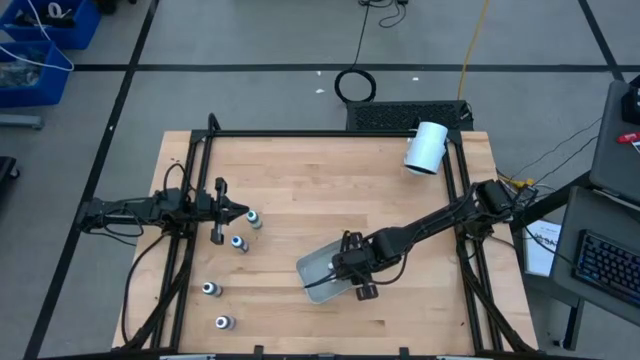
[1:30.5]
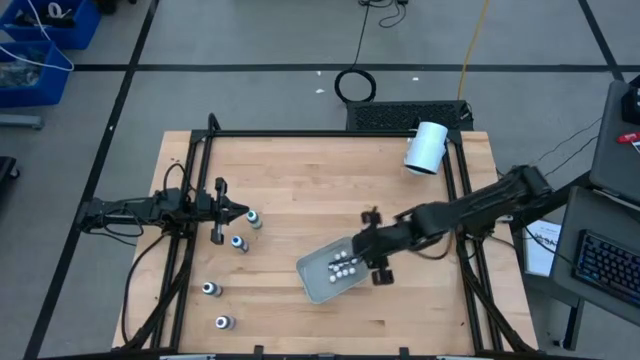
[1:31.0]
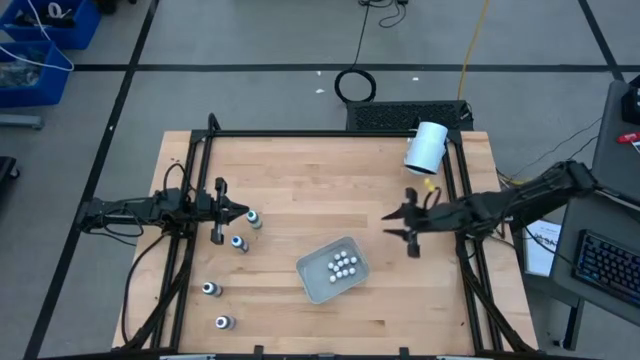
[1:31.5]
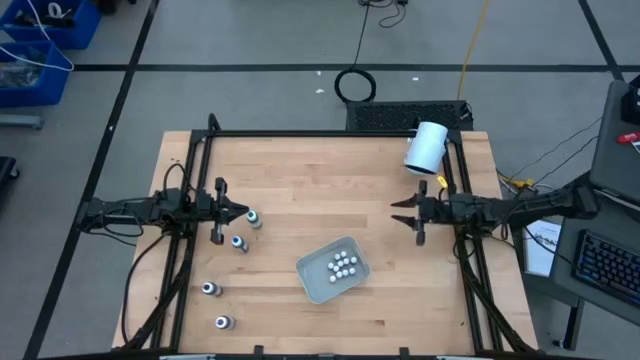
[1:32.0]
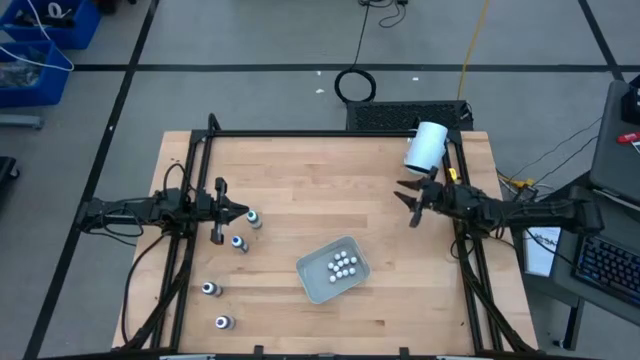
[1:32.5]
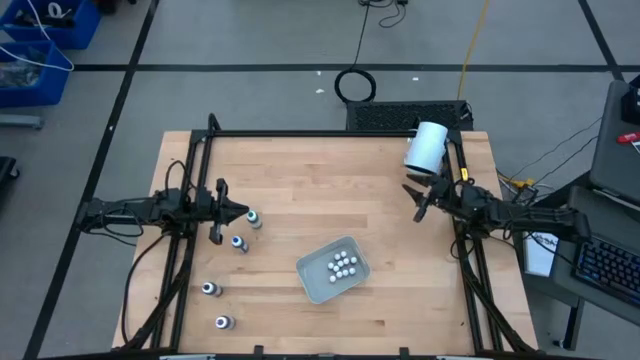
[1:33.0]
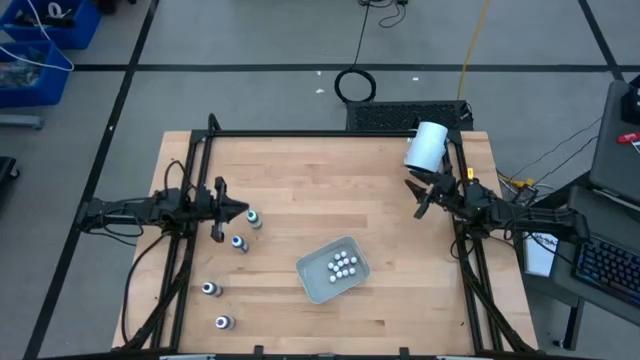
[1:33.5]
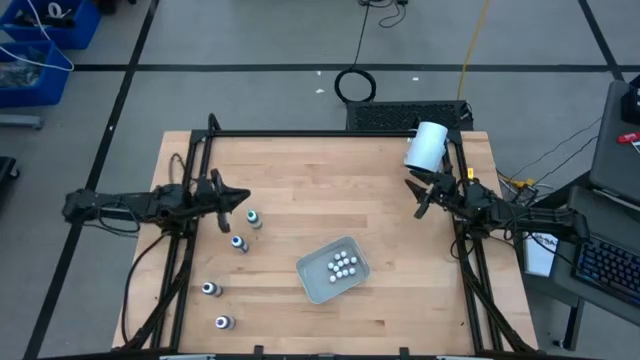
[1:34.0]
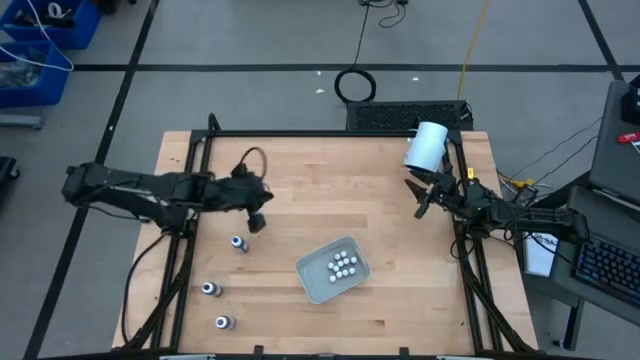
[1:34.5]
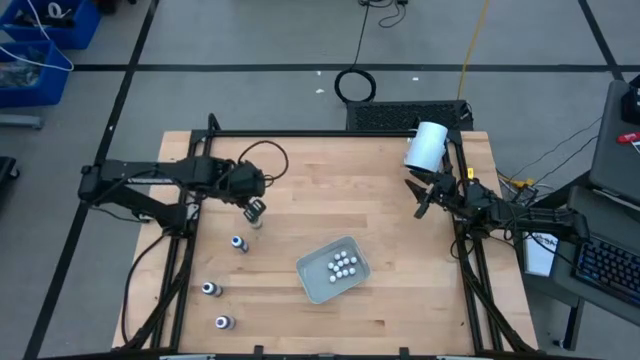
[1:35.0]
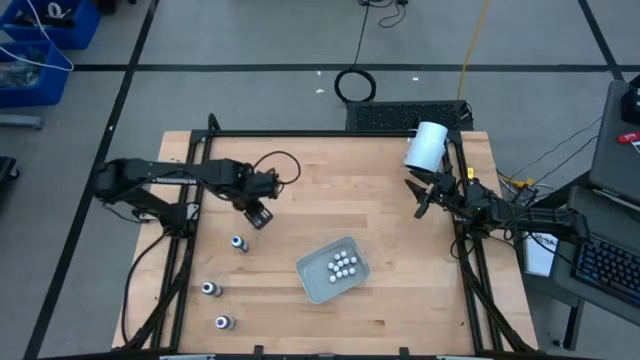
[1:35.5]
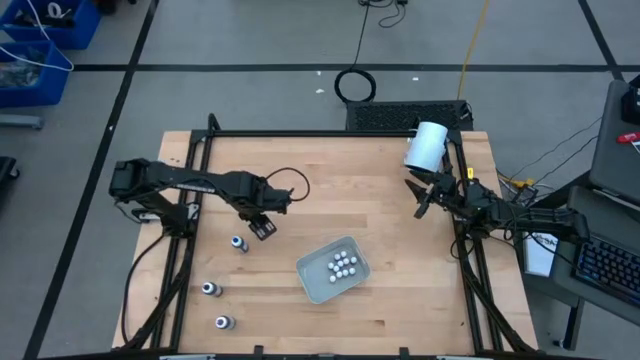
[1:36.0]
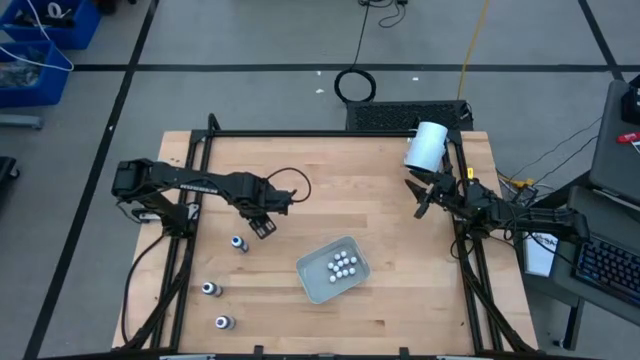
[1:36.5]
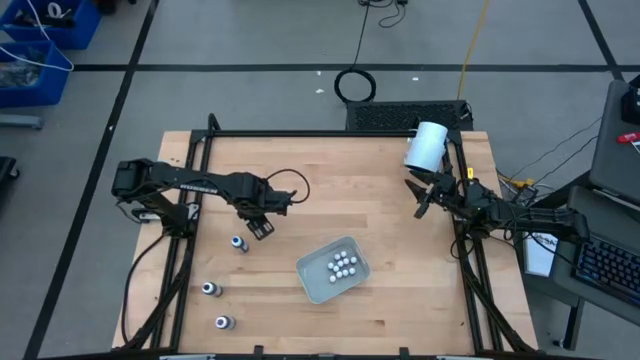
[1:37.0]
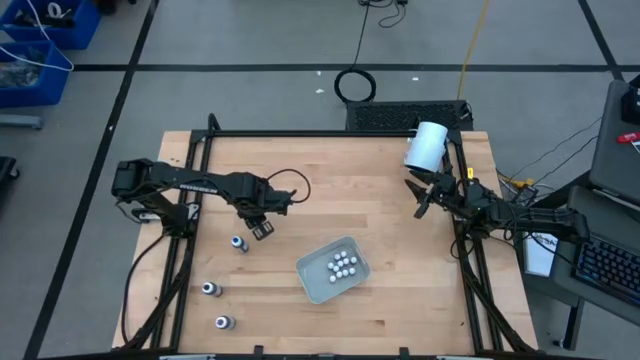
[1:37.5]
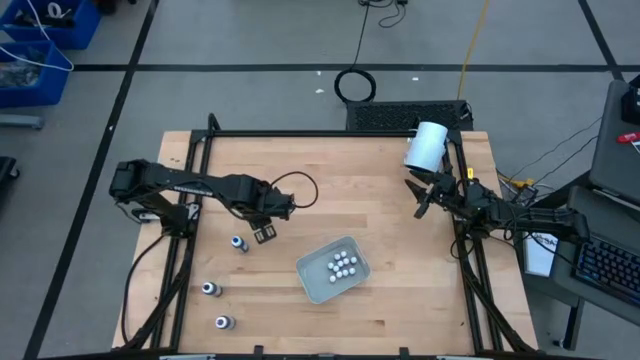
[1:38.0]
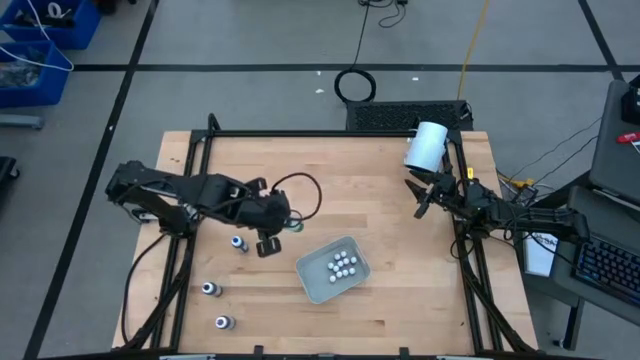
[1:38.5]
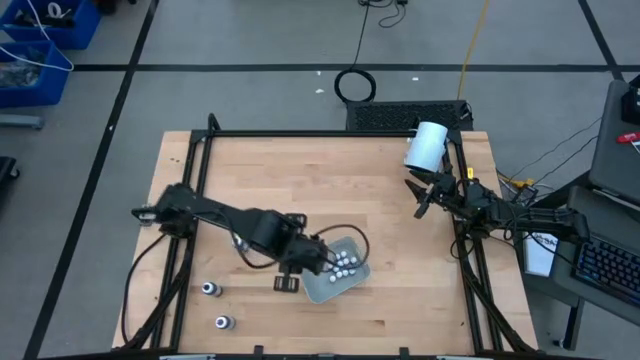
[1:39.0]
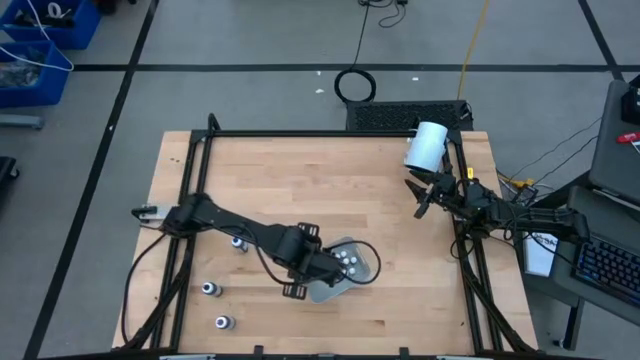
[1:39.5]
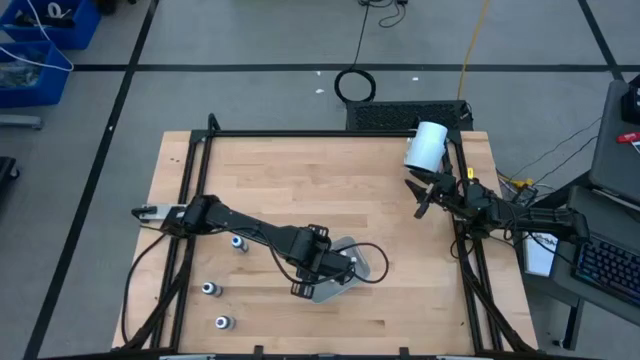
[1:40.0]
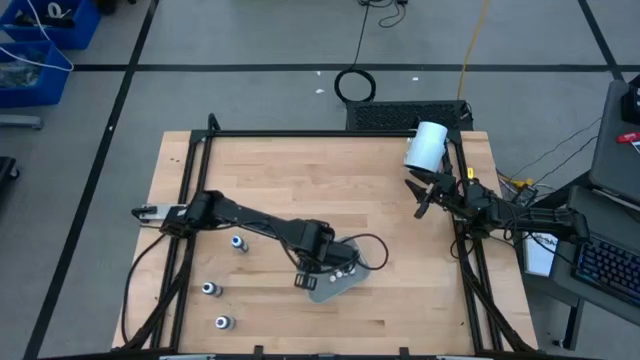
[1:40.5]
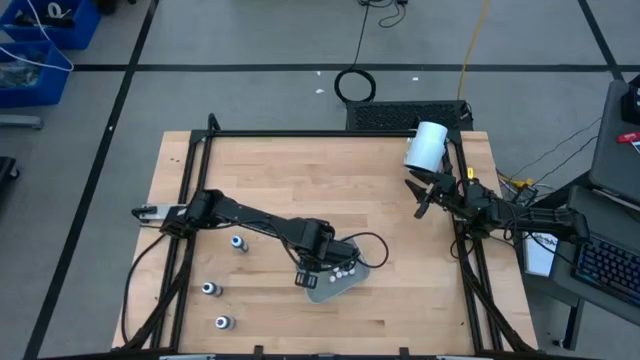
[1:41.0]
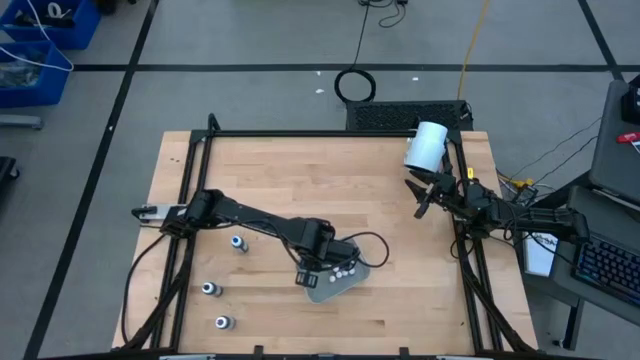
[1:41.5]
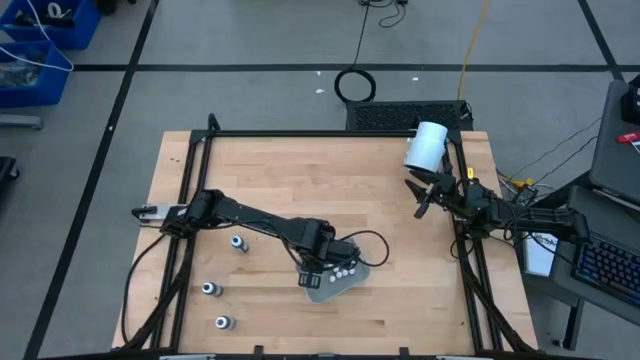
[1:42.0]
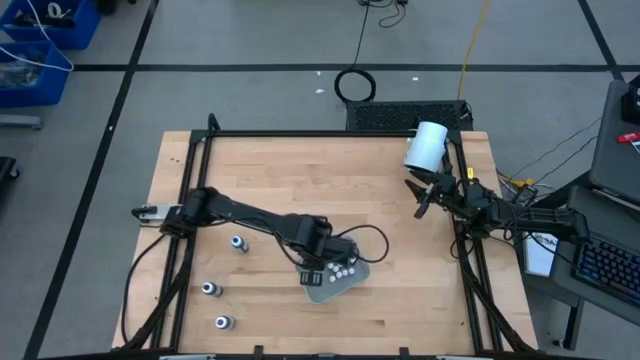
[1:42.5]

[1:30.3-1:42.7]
Task: Pick & Place food coloring
Put the large green food coloring bottle in the gray bin

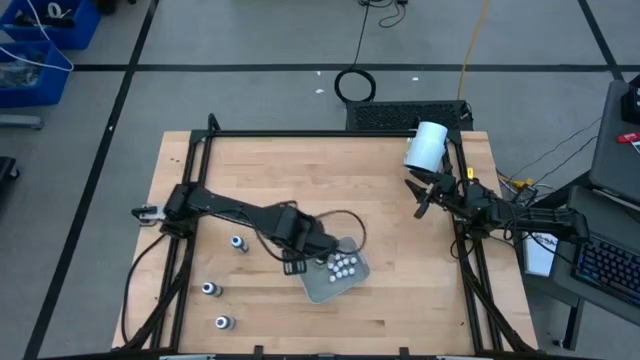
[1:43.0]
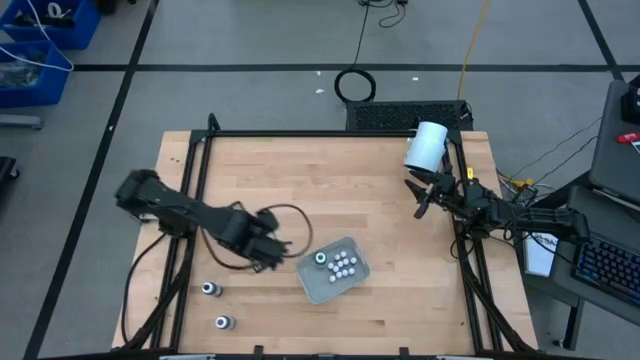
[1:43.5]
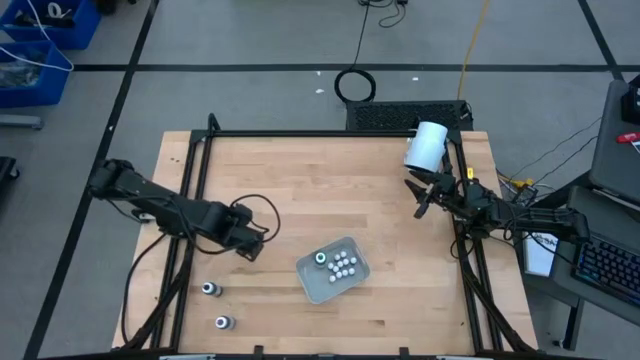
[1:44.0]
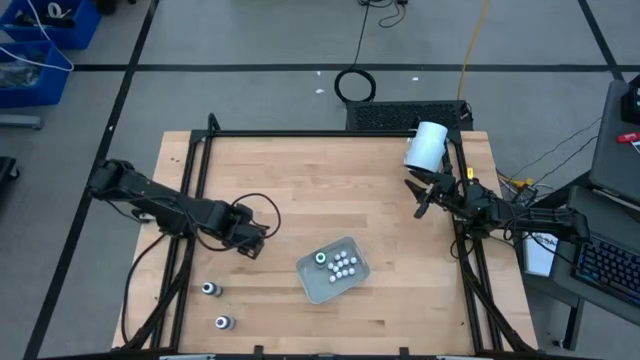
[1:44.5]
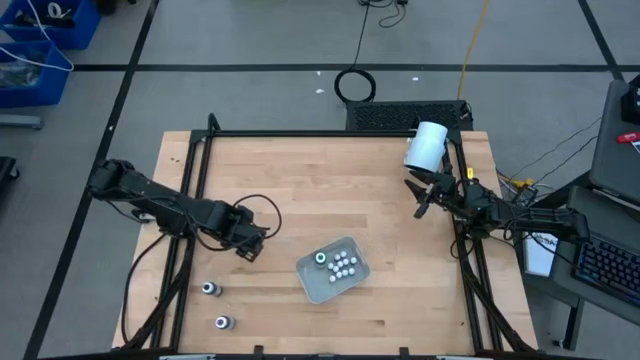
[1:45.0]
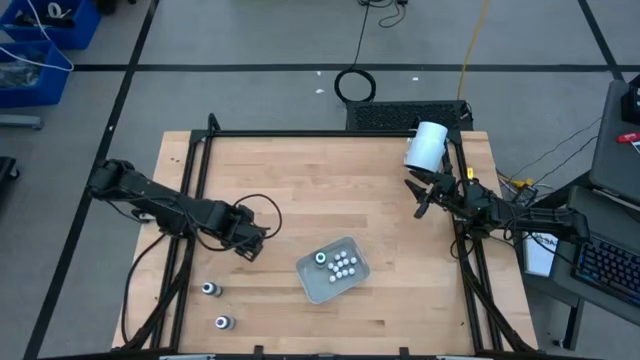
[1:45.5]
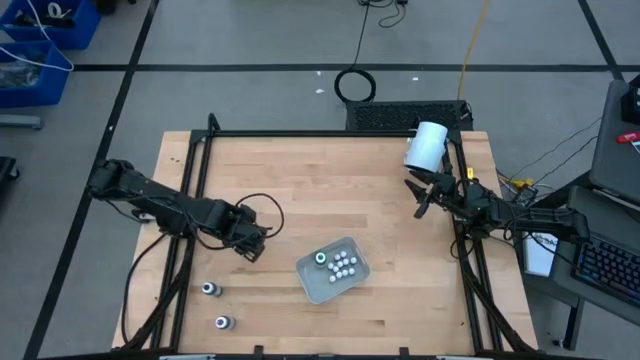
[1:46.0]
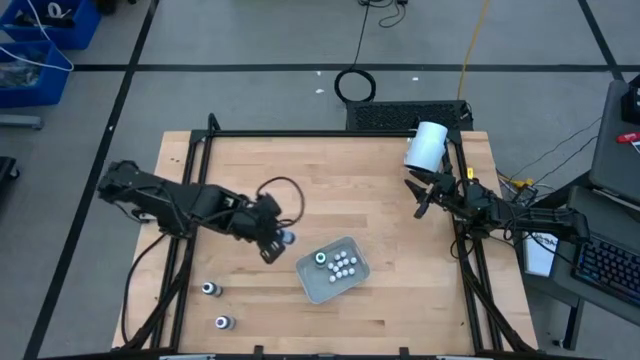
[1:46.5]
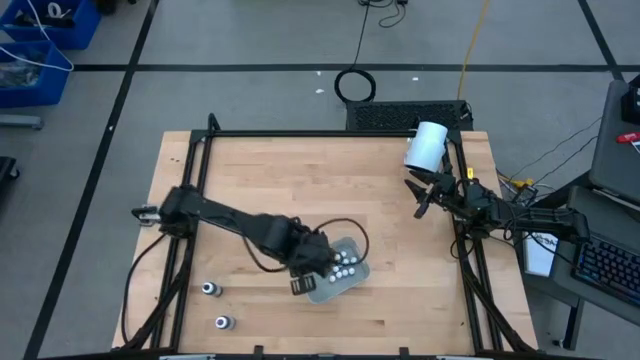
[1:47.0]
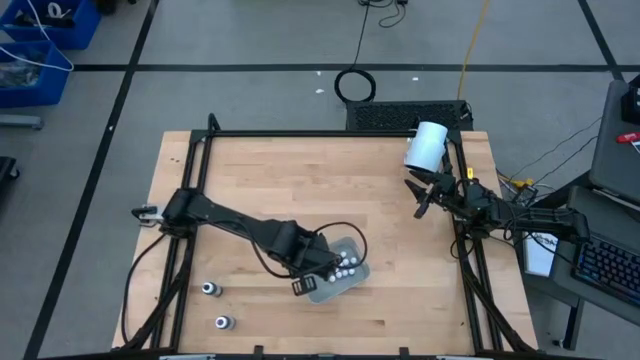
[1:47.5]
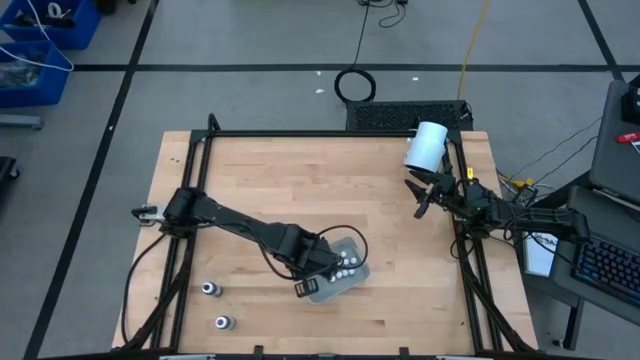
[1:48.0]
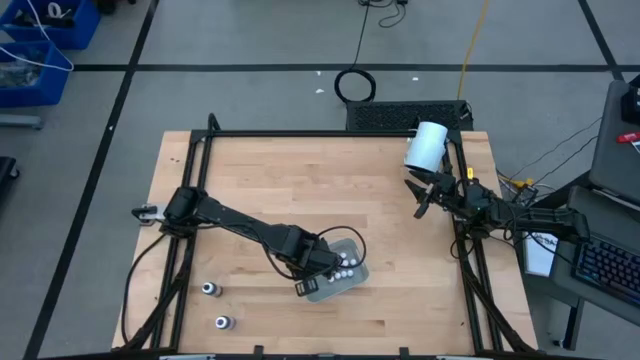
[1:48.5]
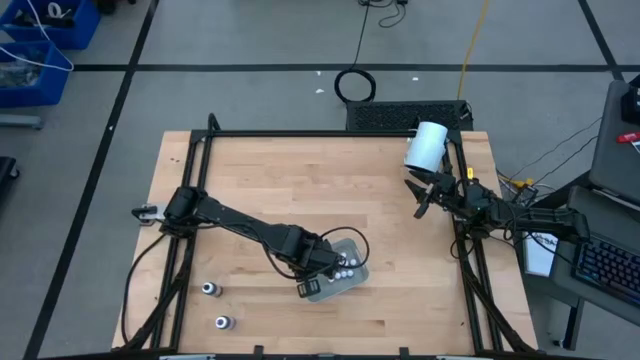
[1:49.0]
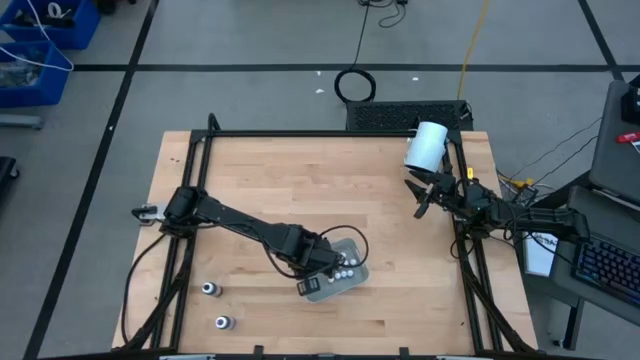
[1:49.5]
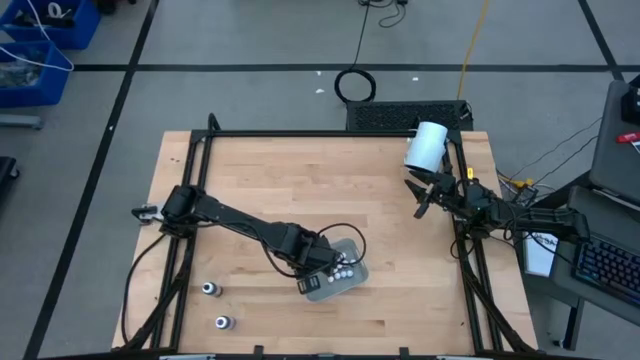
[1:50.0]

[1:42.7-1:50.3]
Put the large blue food coloring bottle in the gray bin

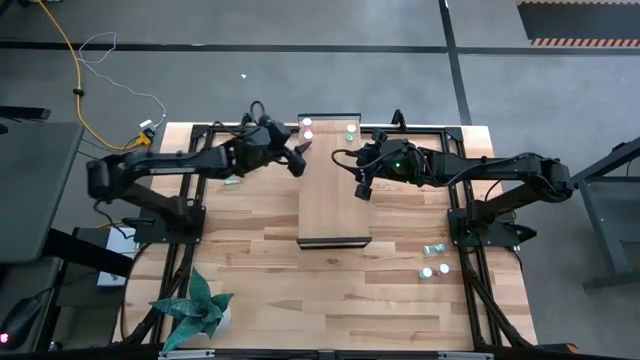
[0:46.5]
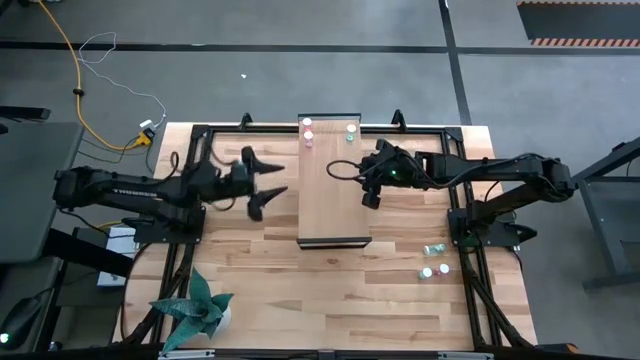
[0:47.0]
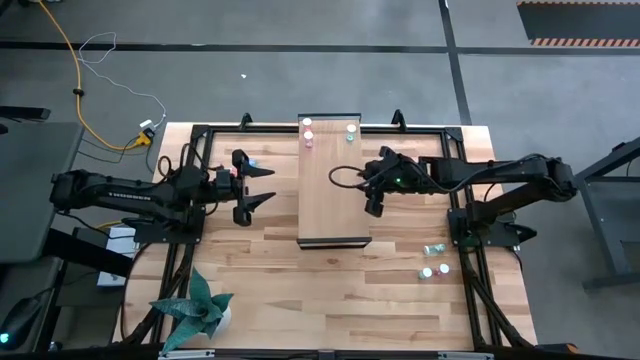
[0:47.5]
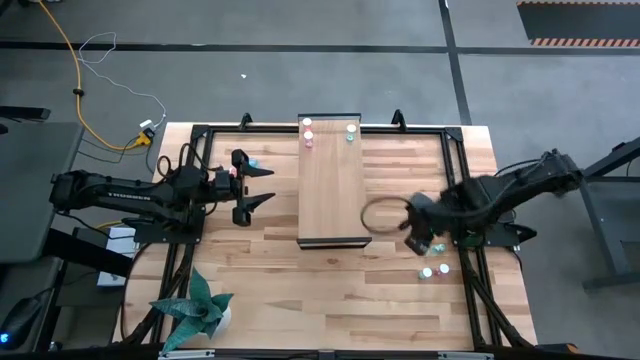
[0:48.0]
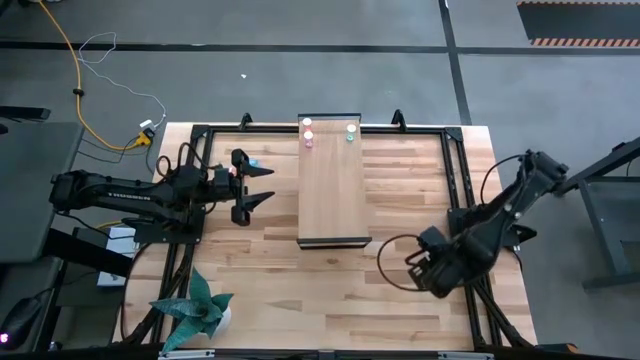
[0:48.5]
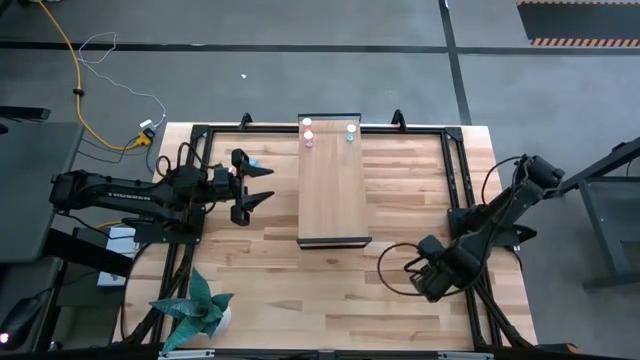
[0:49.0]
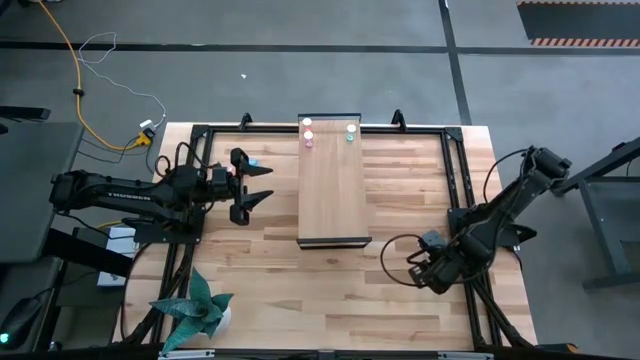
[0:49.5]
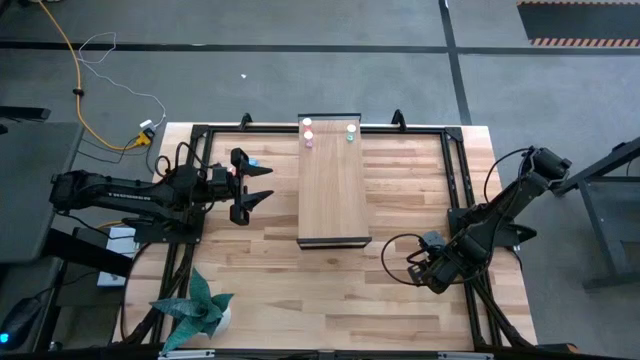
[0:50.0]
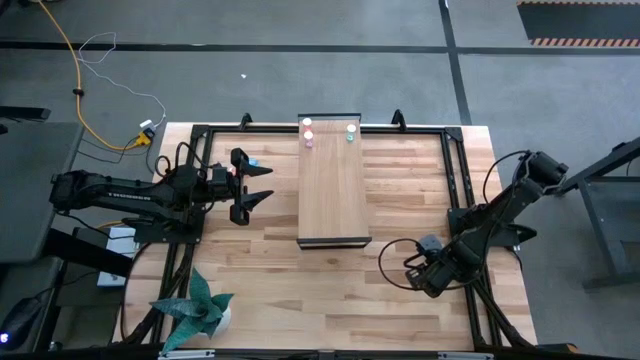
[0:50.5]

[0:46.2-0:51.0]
Task: Pick and place medicine bottles onto shelf by color
Put the transparent blue pill bottle on the shelf
